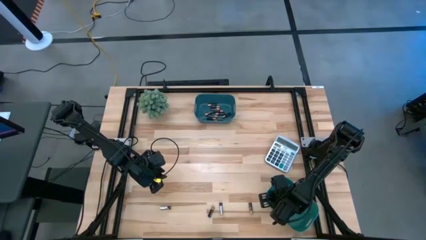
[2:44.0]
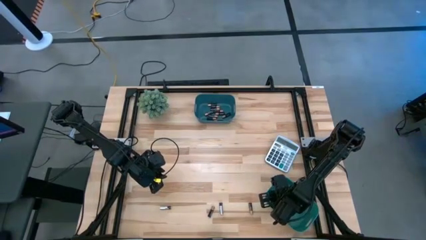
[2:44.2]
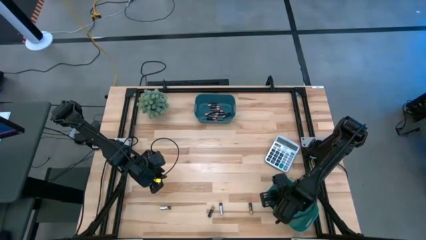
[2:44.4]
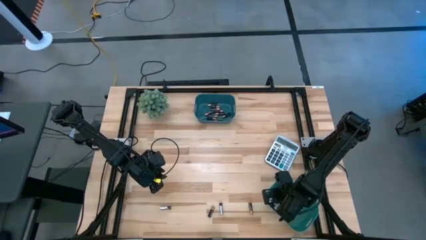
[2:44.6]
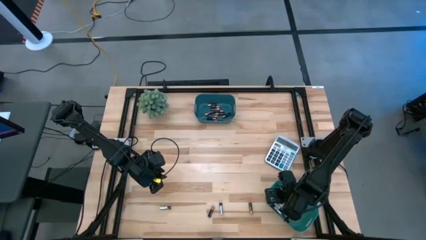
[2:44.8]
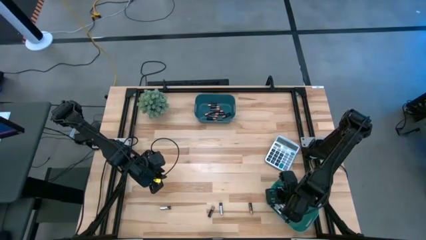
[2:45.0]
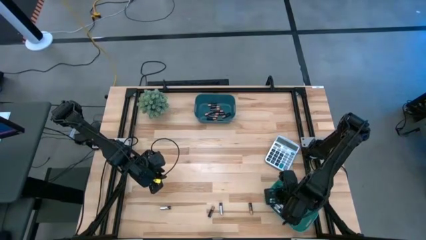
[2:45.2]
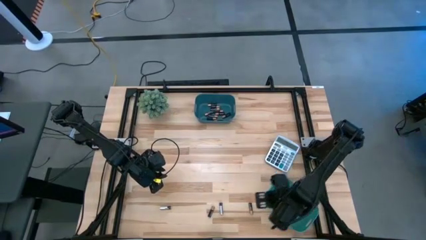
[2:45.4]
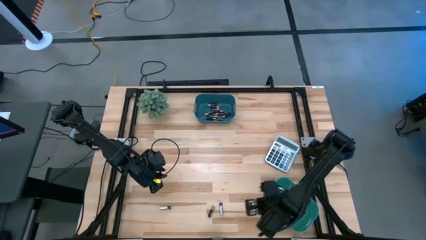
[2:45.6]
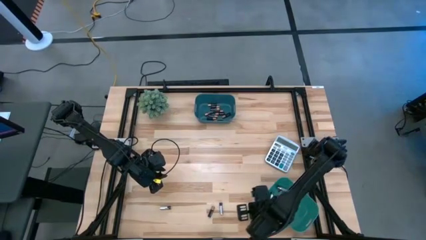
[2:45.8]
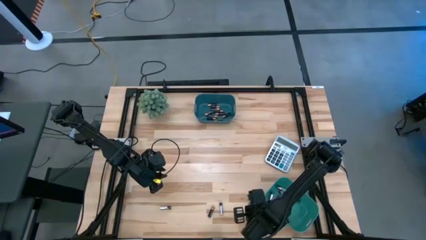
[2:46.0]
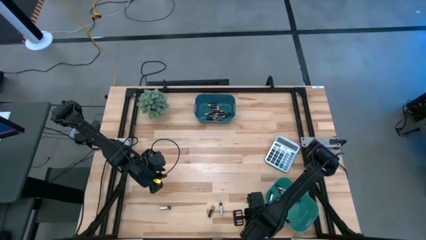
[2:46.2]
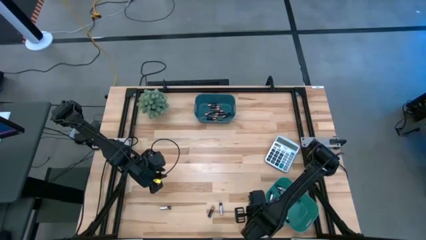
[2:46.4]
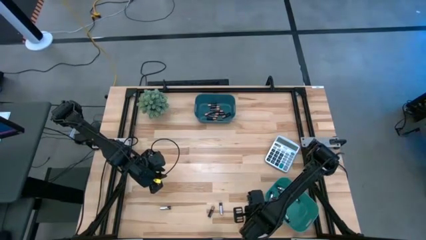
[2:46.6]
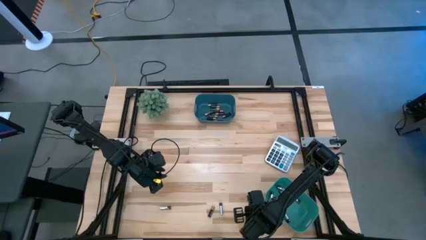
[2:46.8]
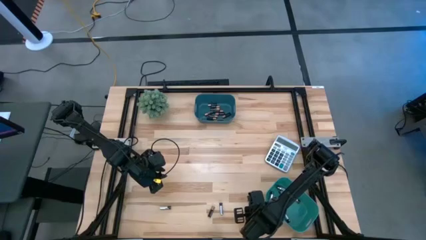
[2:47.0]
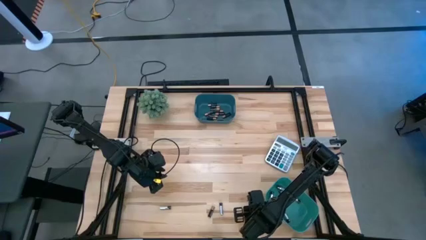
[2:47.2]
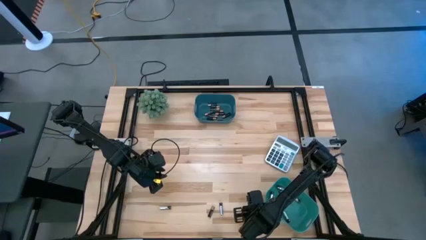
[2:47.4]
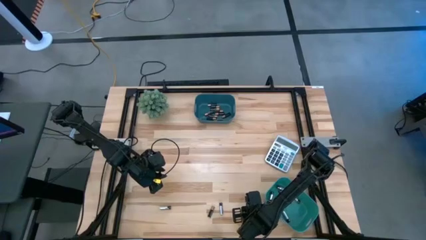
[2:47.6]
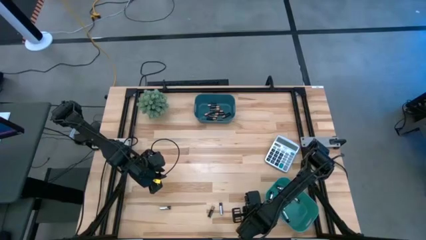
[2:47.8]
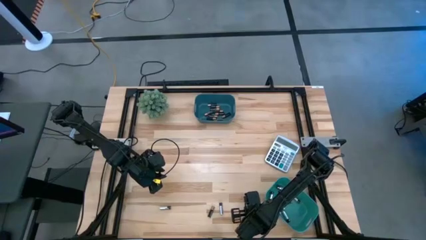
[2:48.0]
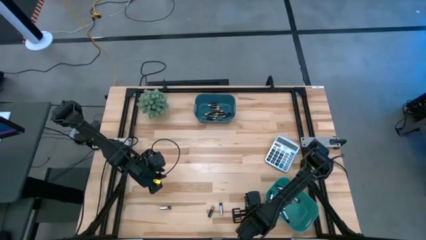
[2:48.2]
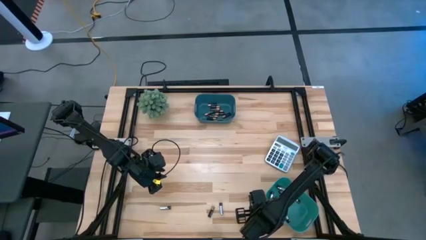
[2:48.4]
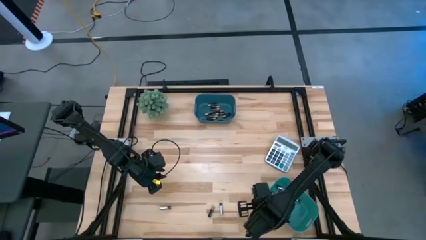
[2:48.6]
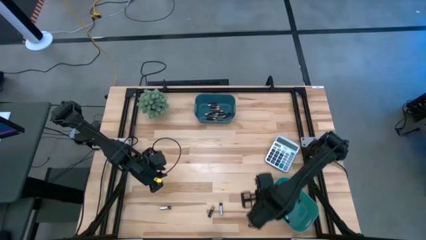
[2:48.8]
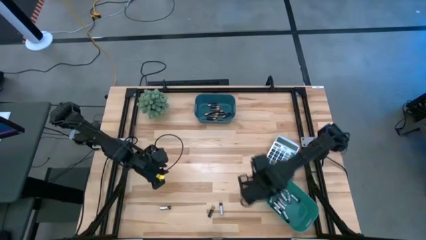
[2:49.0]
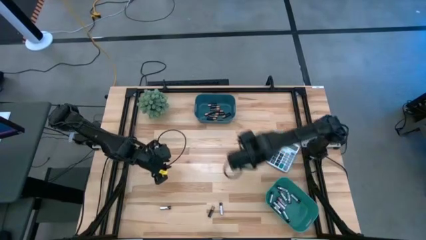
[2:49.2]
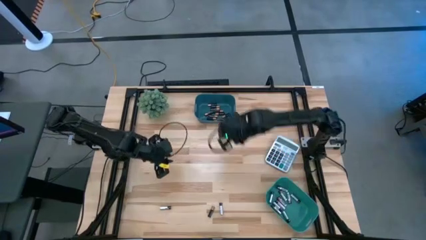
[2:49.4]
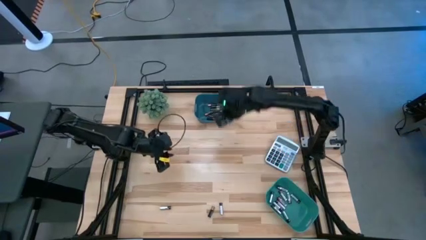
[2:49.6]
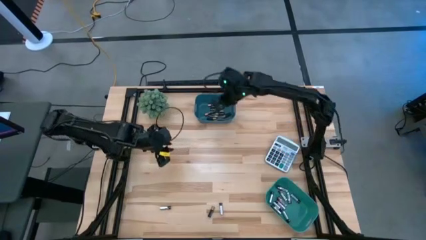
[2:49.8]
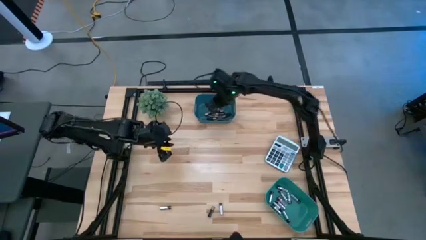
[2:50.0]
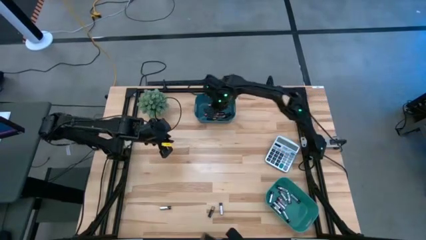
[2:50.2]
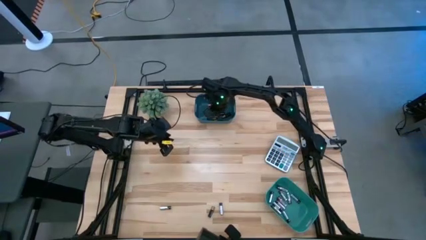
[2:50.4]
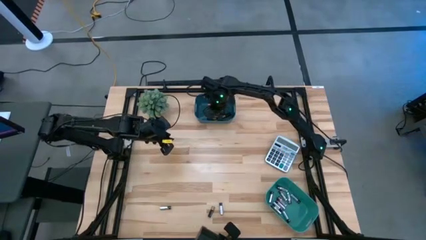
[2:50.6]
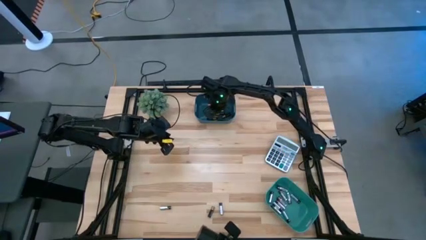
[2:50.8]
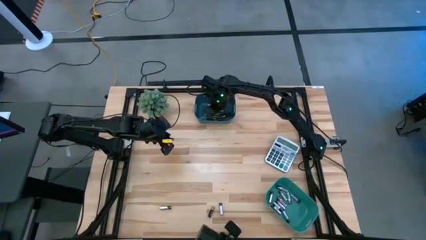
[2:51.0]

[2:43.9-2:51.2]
Task: Sort batteries
Put the black battery into the blue bin

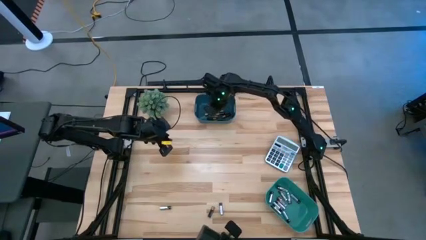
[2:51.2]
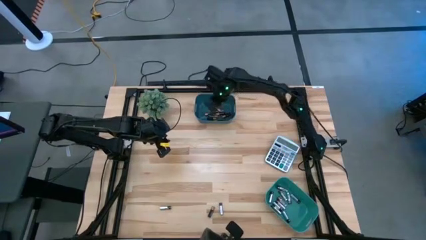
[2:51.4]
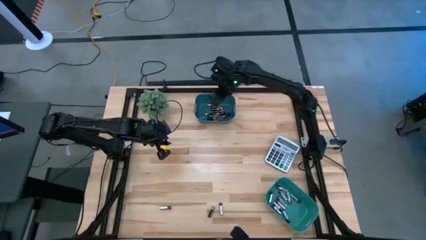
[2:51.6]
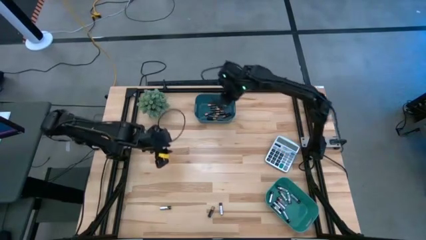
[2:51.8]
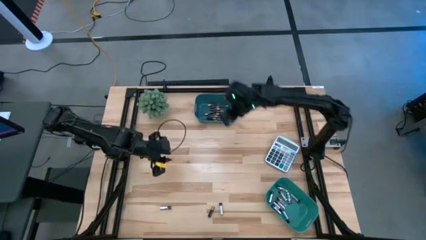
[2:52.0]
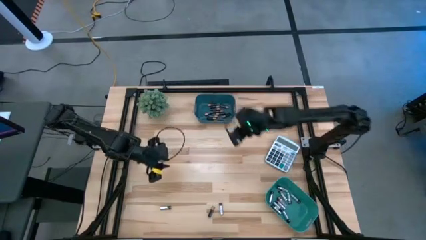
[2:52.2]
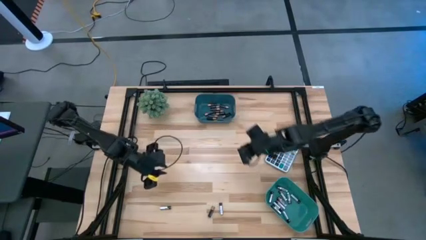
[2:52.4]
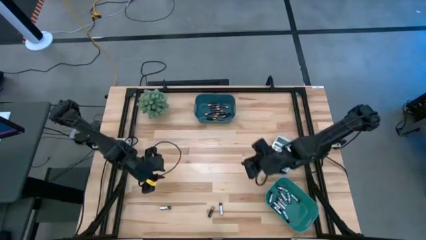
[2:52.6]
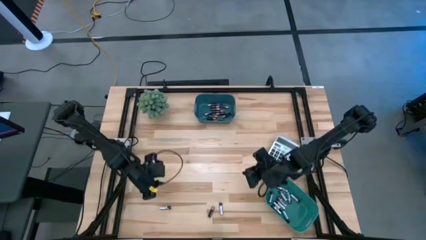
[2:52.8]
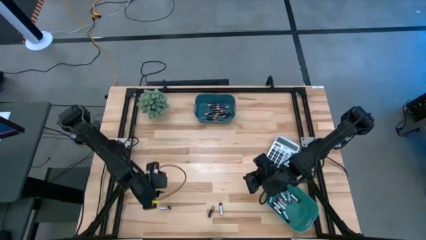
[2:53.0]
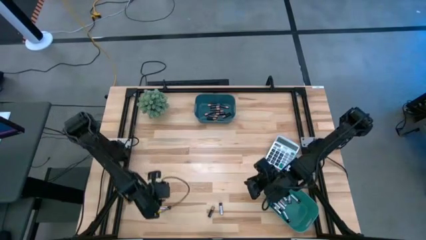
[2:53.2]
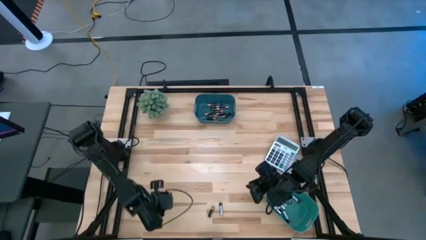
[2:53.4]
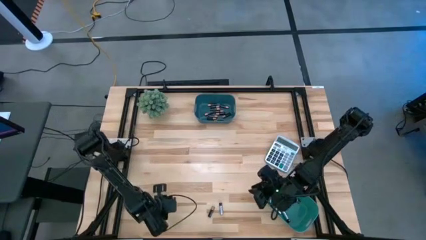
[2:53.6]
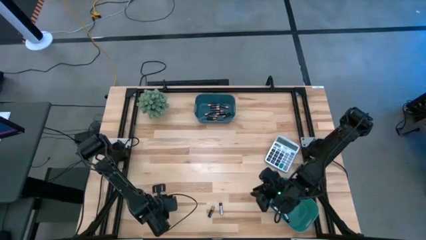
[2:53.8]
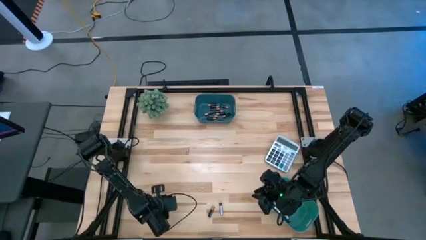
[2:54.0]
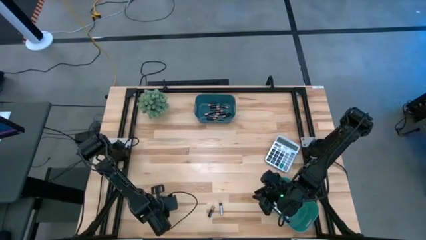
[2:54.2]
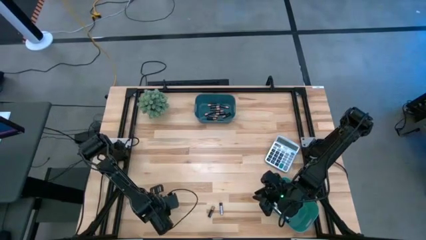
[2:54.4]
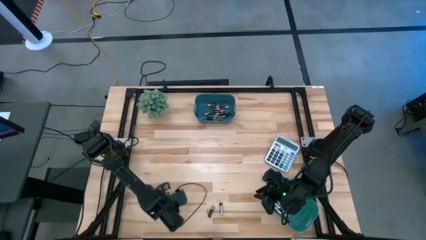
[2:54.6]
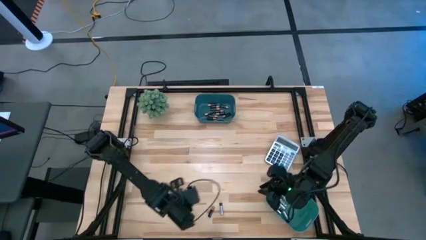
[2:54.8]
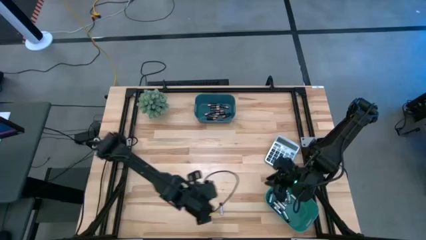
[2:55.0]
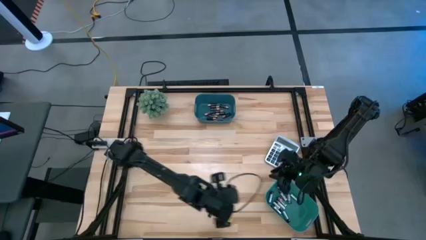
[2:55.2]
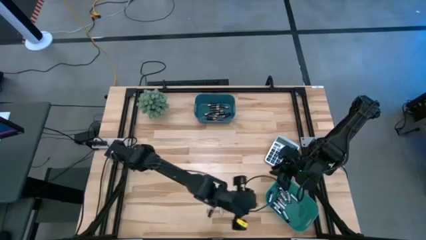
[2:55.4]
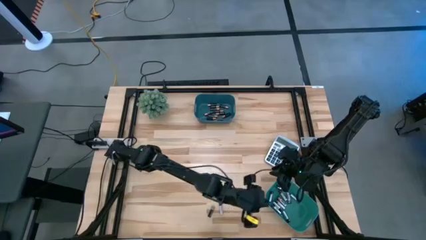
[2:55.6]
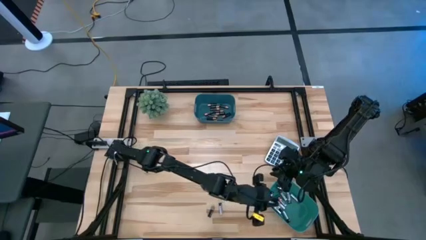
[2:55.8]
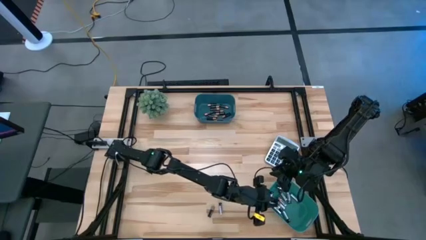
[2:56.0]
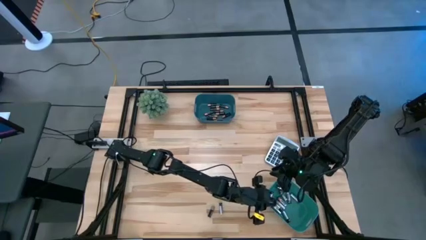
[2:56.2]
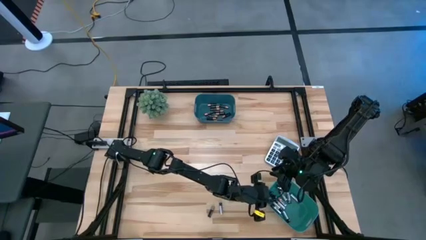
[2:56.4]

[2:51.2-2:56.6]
Put the silver battery into the green bin

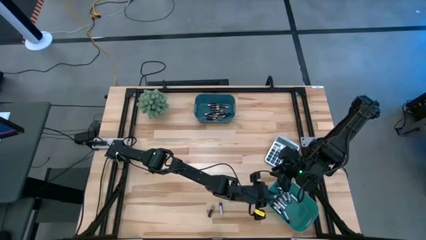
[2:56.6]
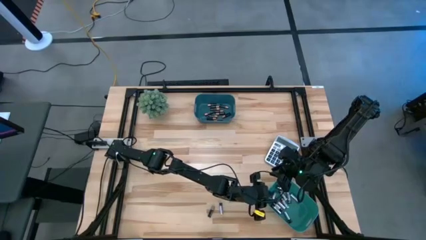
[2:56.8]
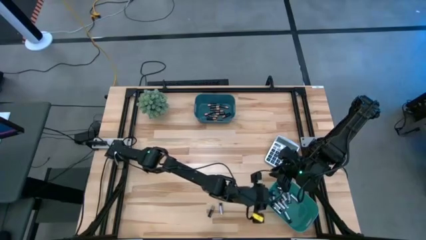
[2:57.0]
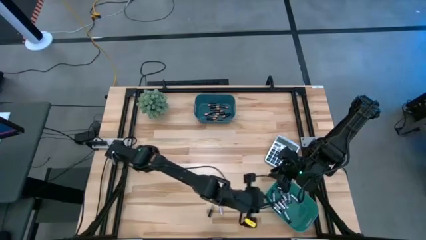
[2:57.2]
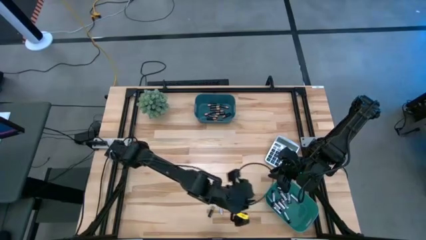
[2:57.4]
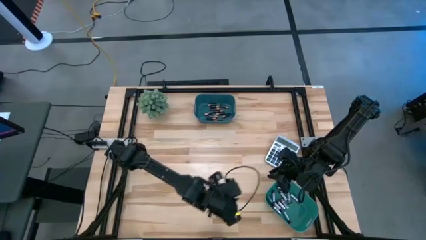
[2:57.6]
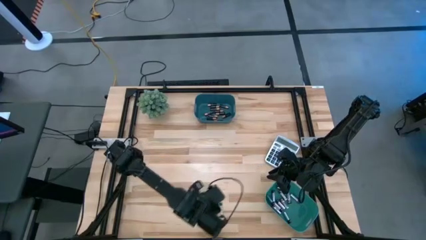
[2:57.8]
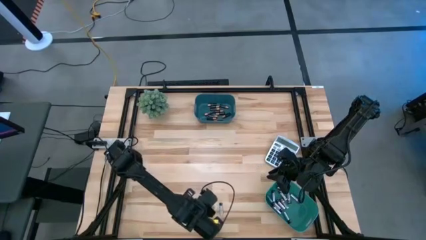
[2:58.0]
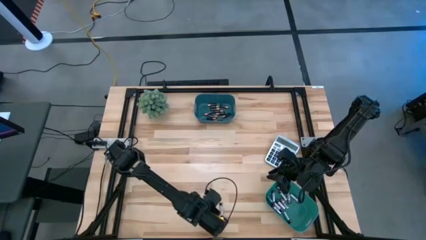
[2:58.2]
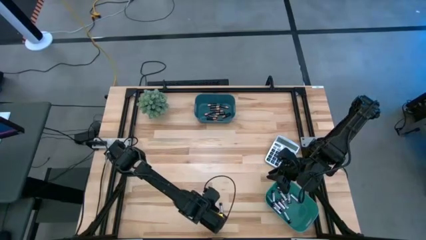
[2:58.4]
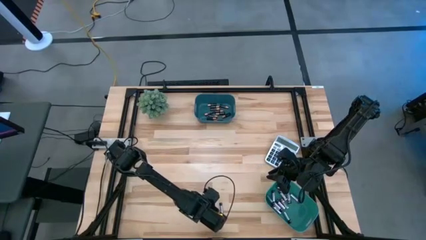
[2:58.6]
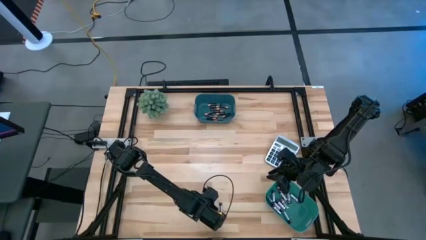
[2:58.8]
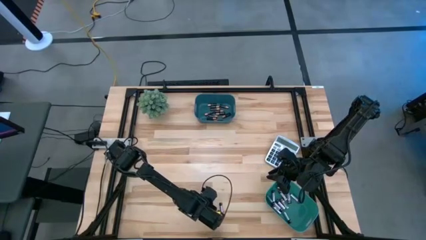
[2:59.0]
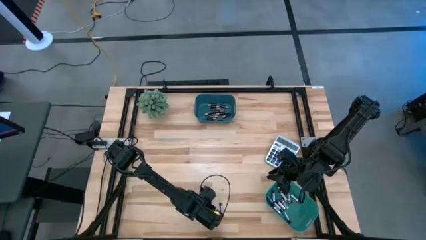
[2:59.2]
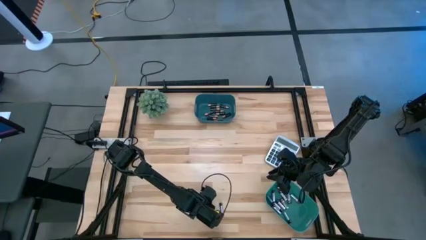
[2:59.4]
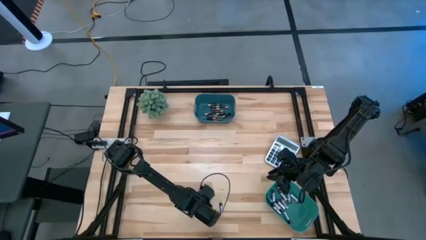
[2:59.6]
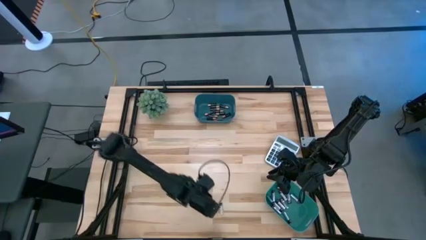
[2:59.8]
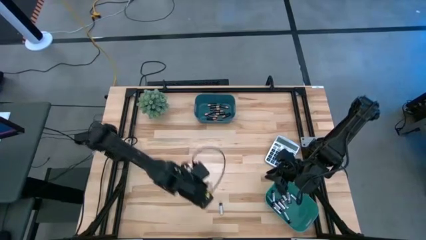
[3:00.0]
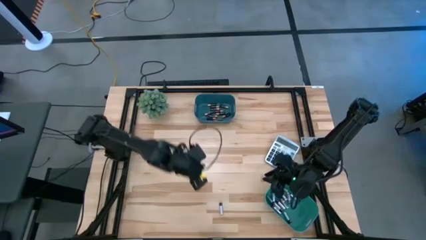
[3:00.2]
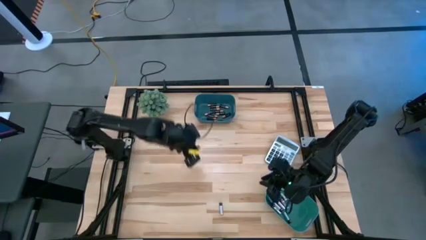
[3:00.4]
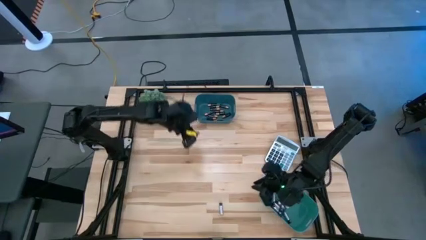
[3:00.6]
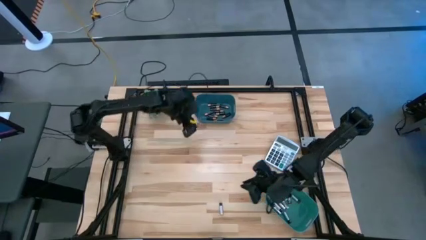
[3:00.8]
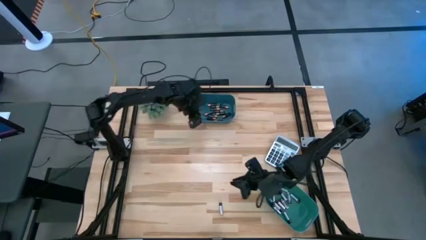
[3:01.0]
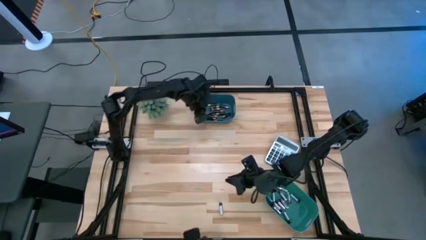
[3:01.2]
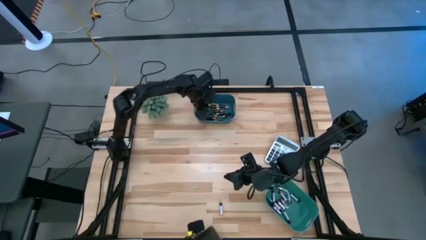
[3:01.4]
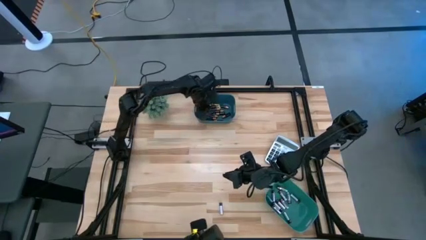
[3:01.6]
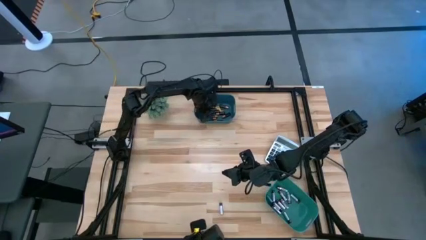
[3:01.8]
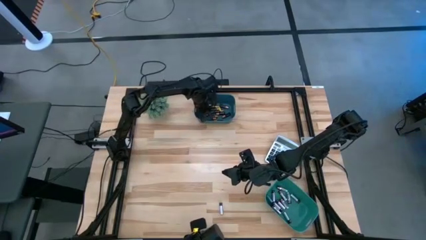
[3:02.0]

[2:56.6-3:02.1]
Put the black battery into the blue bin
